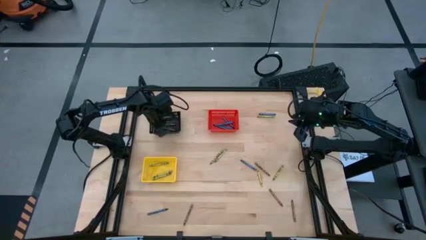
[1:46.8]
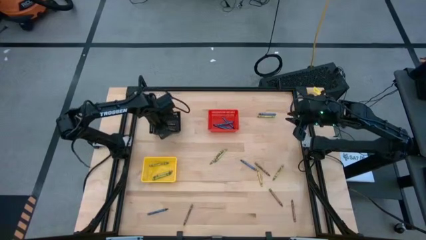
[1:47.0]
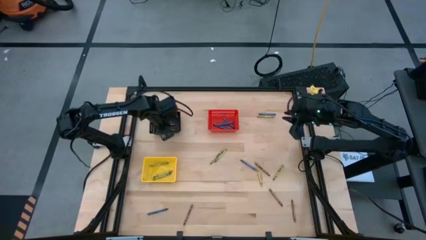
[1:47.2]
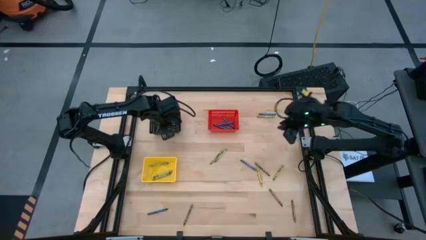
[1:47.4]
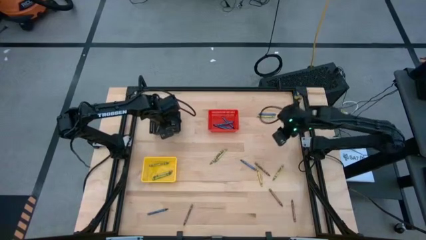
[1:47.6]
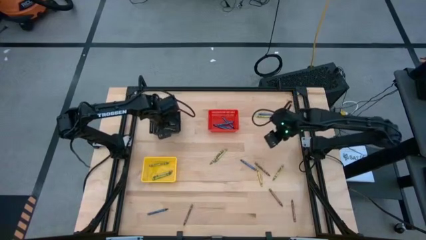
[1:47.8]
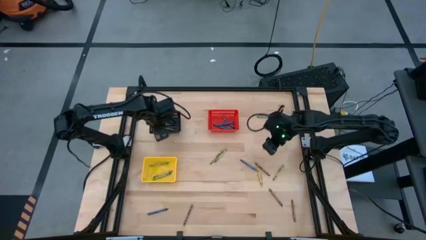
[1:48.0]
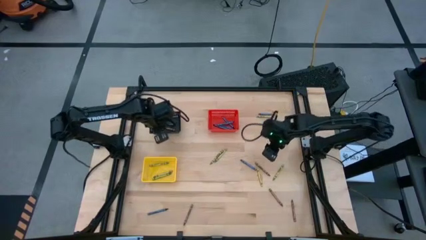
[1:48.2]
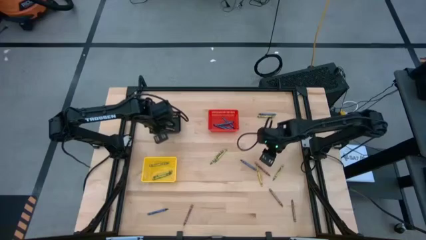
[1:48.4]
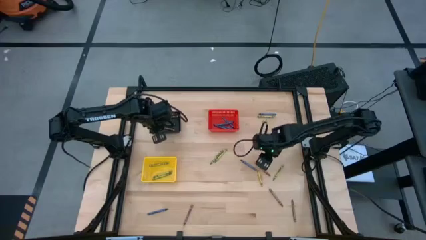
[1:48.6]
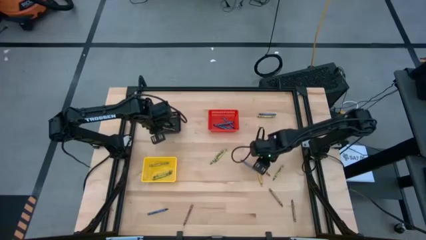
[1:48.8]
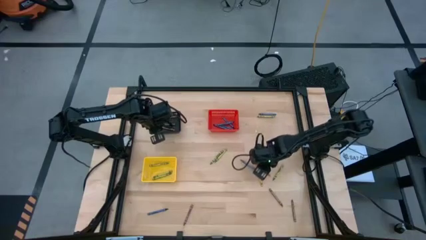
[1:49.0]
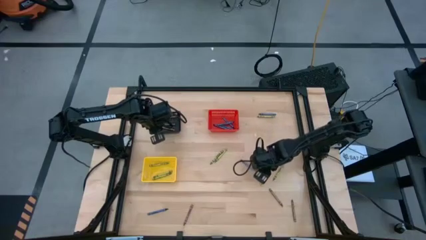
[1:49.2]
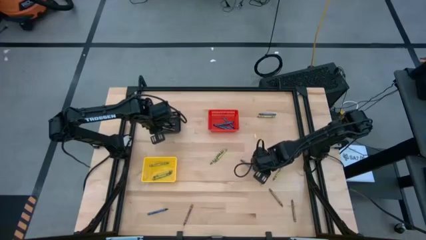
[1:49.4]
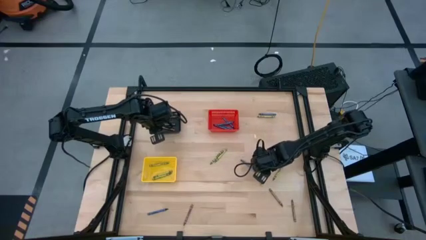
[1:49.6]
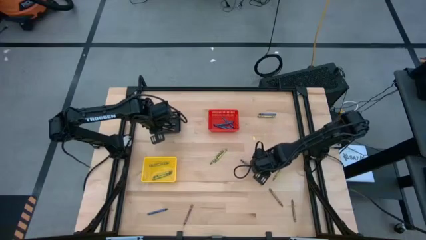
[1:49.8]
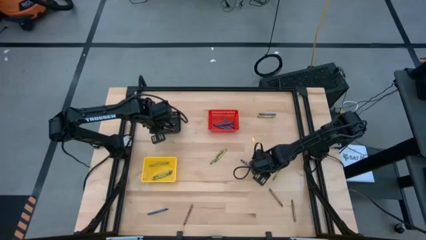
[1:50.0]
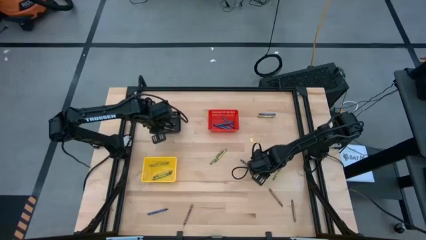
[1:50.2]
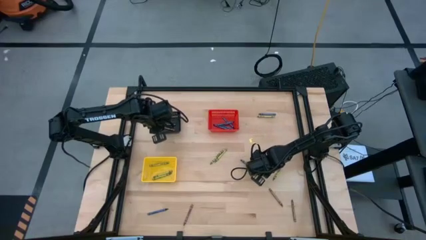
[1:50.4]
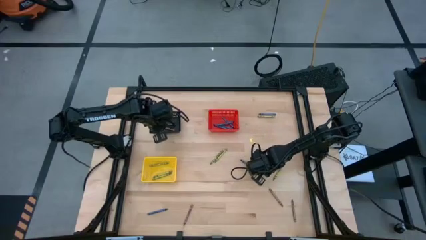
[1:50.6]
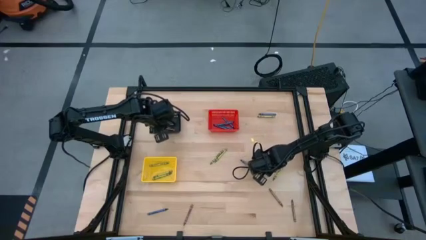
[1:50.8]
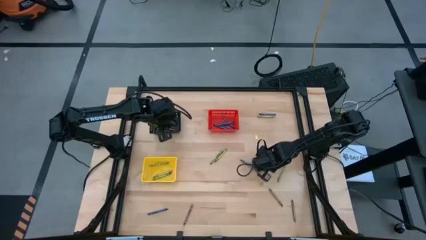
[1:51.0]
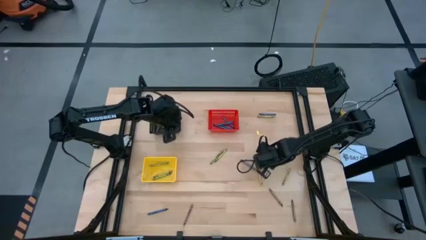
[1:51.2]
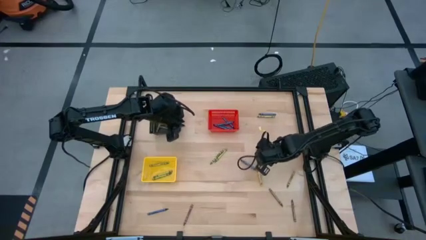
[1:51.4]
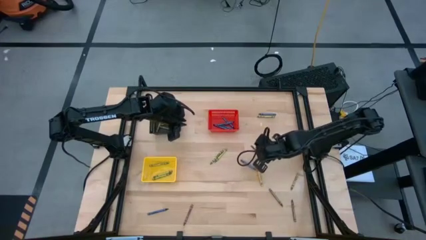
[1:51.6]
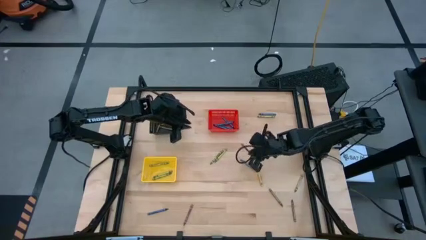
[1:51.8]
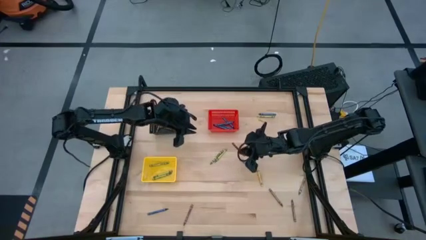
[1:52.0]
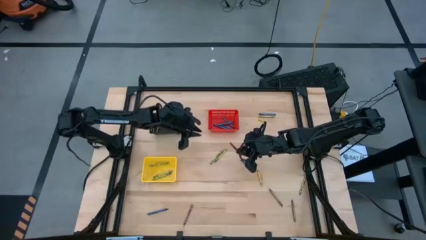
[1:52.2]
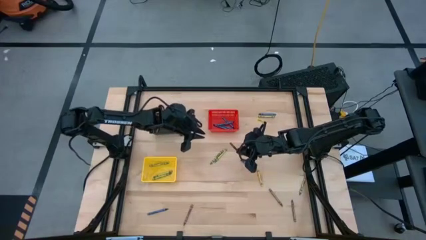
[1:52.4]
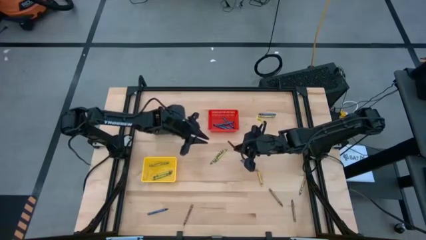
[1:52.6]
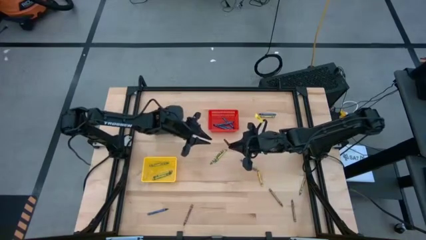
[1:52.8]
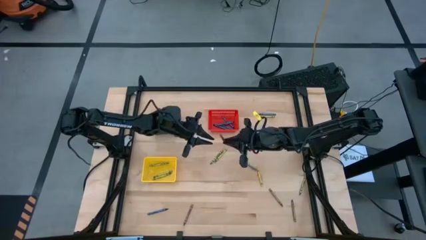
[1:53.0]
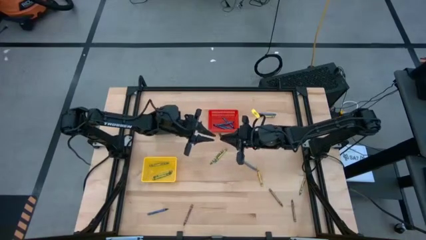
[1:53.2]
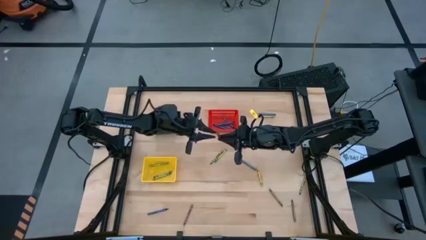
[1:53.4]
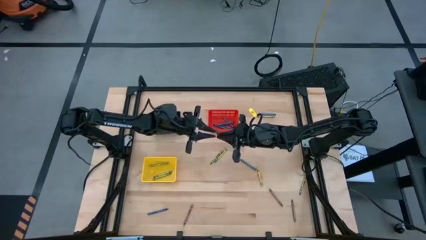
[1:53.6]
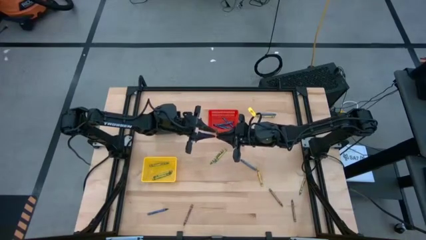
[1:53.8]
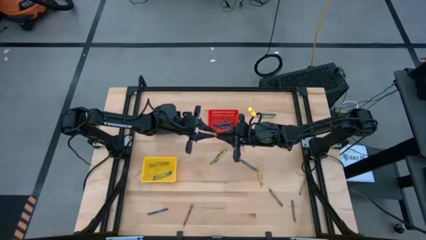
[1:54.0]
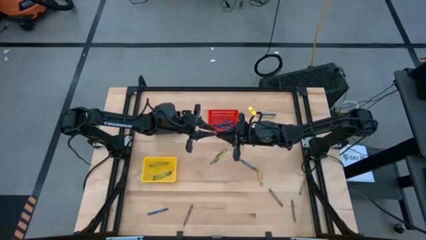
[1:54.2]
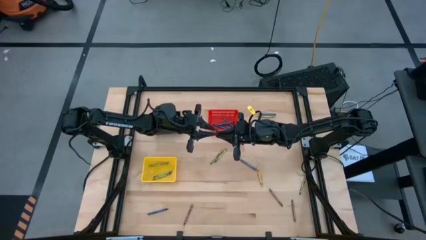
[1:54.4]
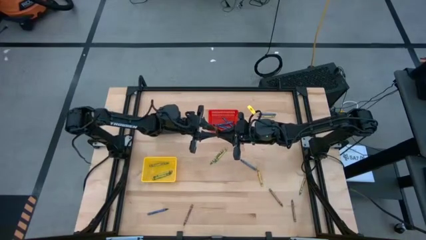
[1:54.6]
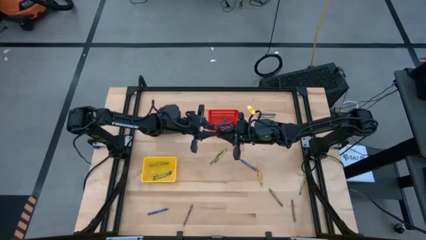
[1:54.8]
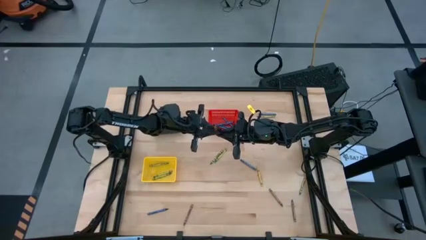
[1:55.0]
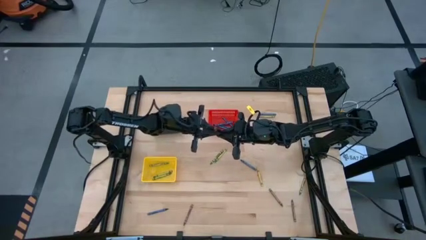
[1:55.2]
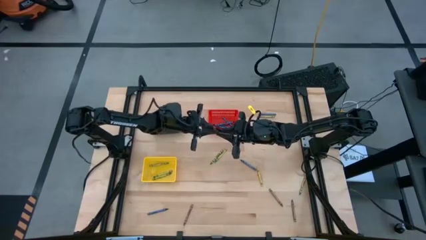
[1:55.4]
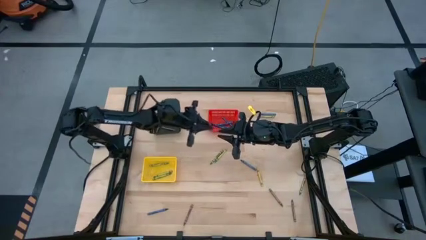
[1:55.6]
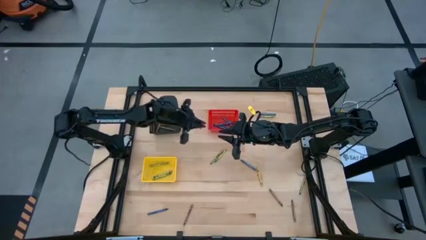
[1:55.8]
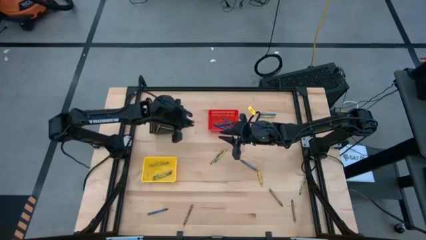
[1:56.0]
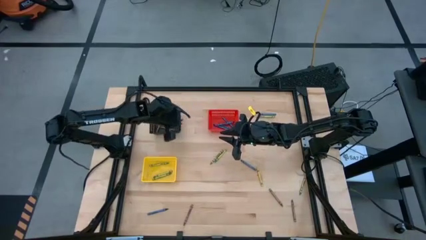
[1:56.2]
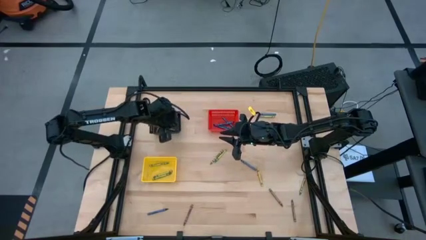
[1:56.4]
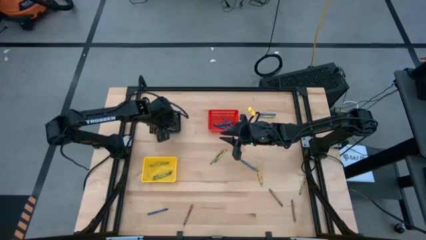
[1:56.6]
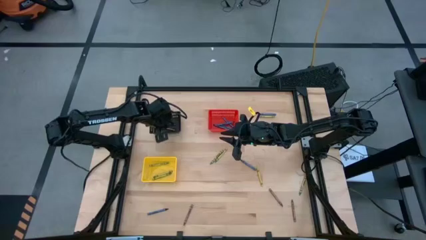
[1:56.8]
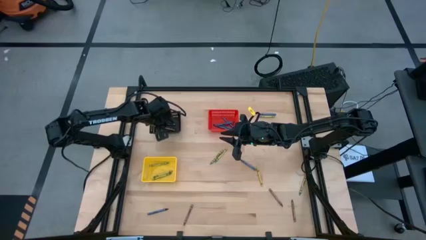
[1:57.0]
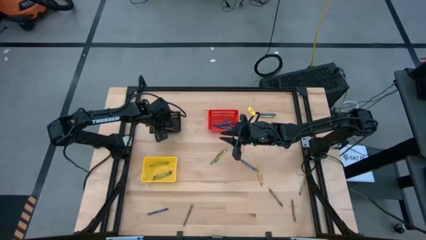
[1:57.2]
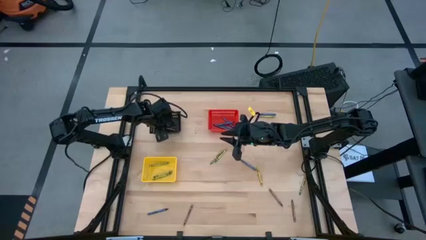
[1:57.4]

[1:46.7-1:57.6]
Task: Sort crayons
Put the brown crayon into the black bin

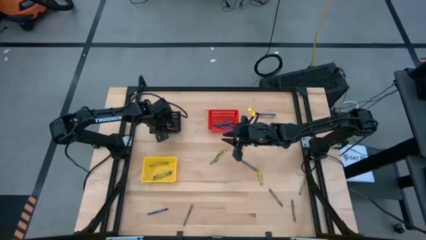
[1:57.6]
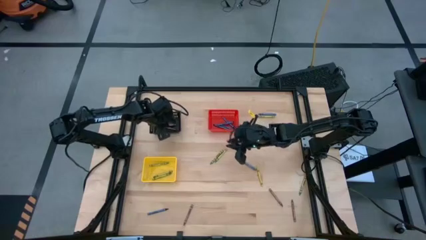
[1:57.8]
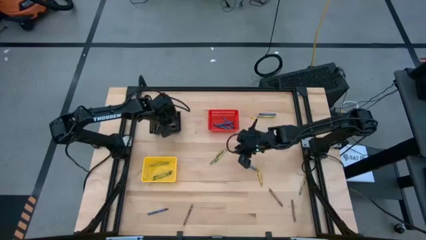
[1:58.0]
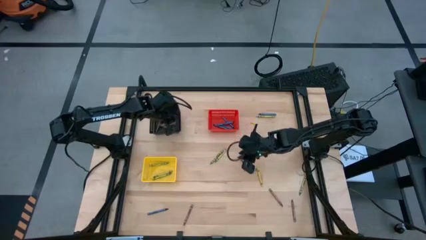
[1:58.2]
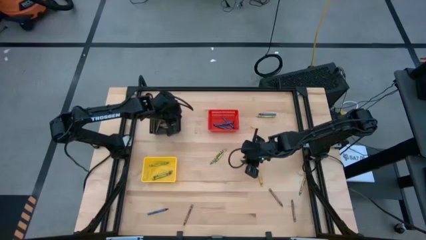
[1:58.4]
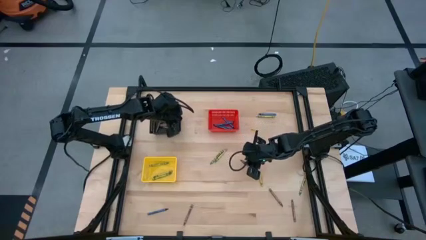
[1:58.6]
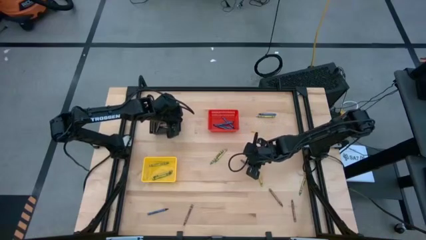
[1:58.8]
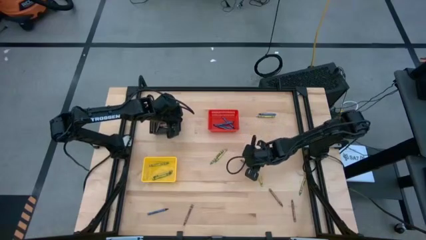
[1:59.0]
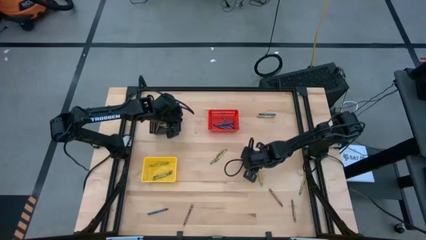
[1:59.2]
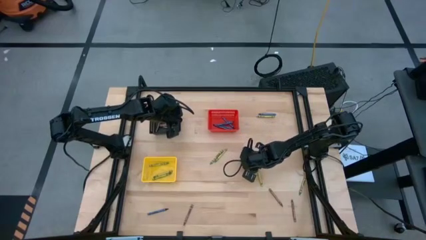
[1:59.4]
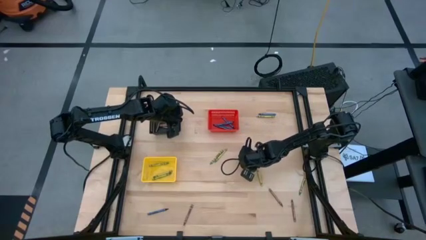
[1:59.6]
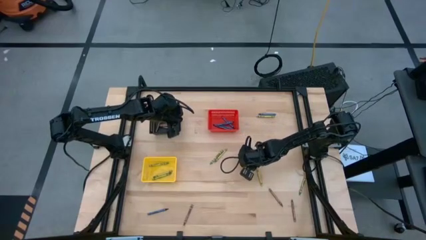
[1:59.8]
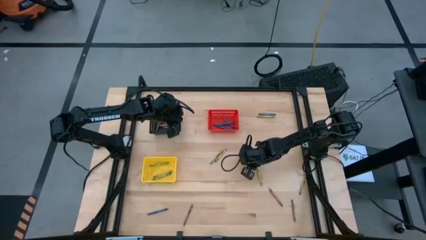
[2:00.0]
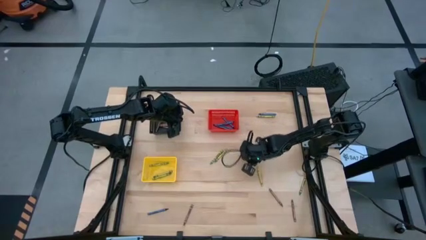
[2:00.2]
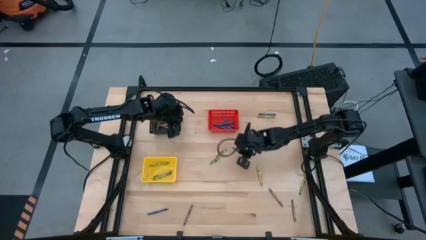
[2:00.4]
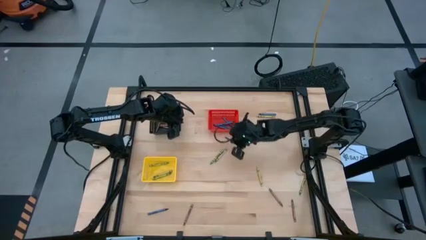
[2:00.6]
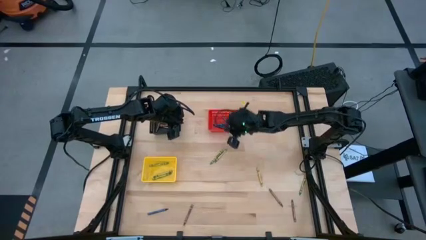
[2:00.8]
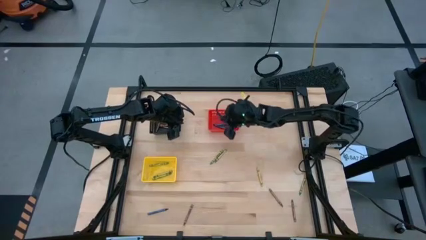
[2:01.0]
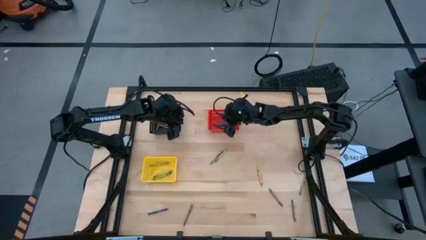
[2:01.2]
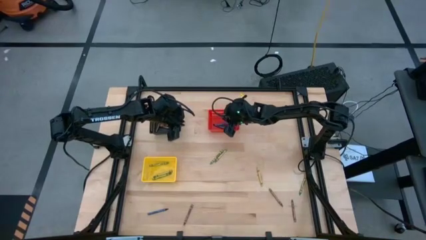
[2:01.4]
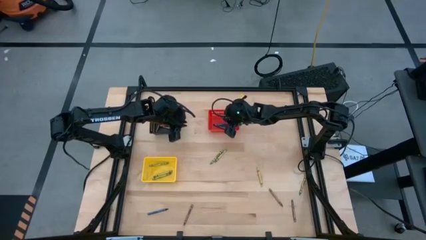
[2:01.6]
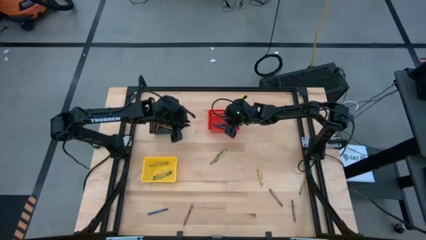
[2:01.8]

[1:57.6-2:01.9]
Put the blue crayon into the red bin
